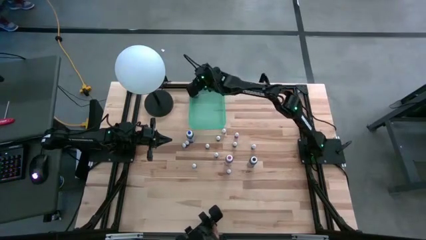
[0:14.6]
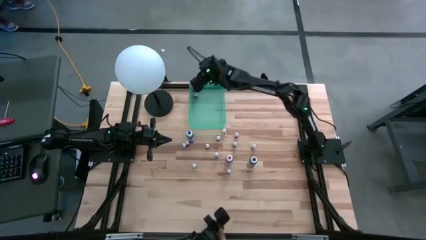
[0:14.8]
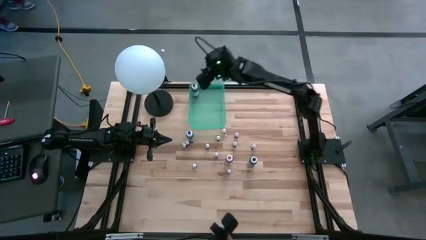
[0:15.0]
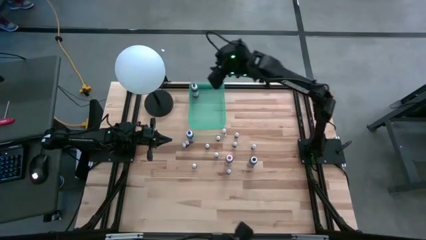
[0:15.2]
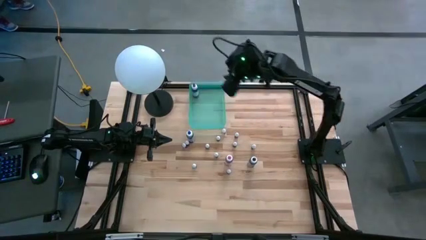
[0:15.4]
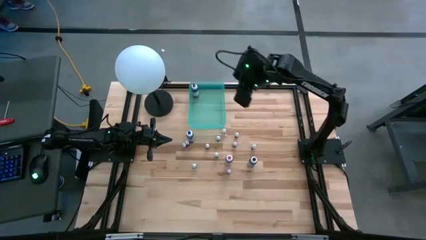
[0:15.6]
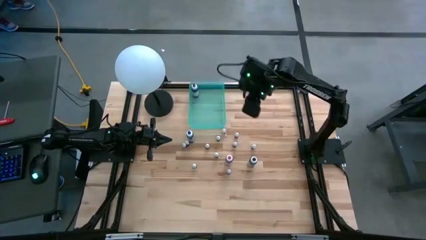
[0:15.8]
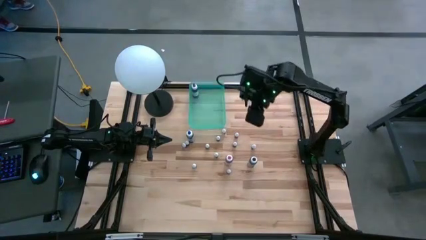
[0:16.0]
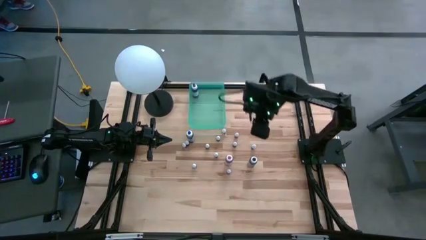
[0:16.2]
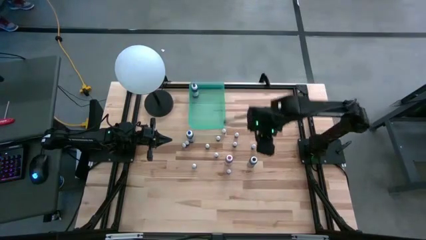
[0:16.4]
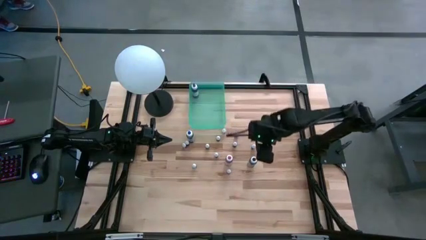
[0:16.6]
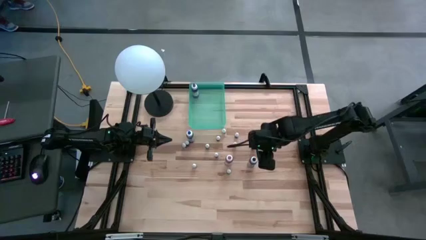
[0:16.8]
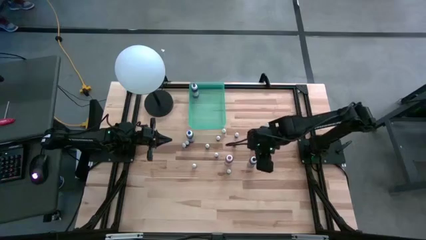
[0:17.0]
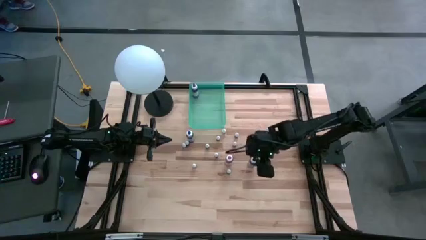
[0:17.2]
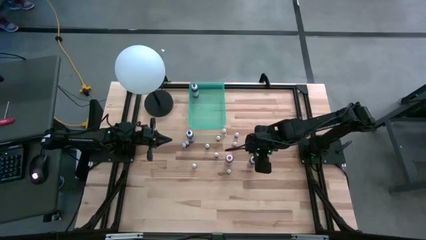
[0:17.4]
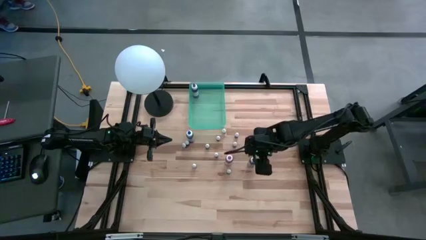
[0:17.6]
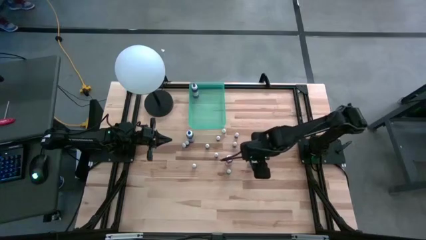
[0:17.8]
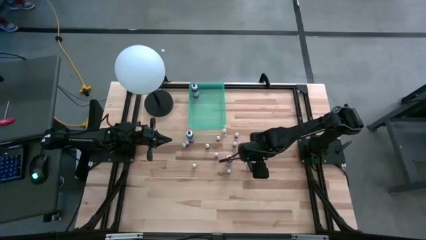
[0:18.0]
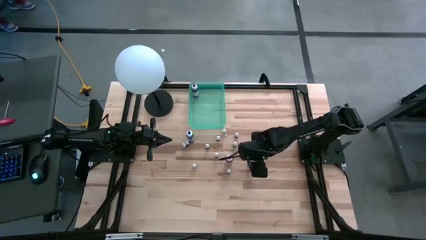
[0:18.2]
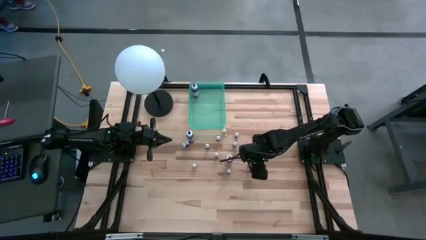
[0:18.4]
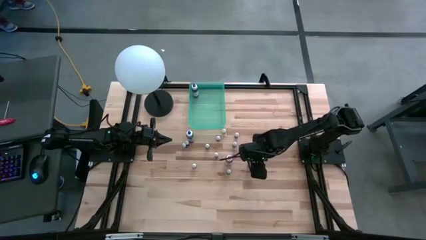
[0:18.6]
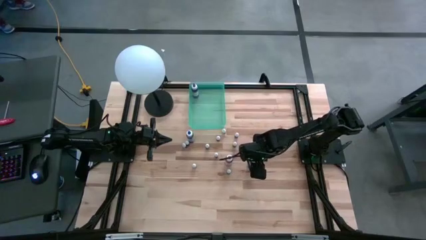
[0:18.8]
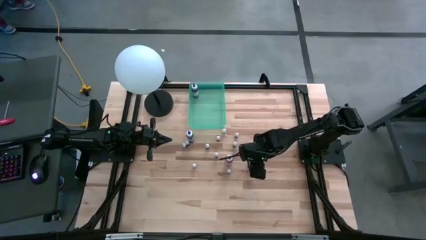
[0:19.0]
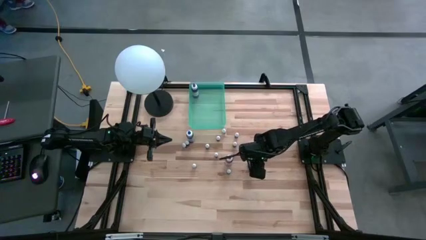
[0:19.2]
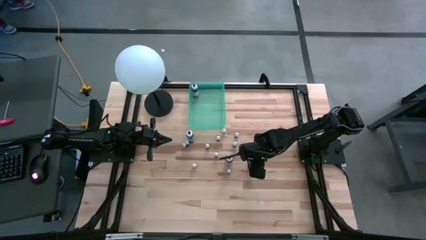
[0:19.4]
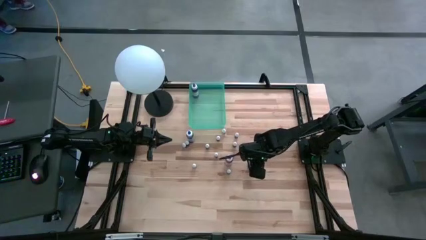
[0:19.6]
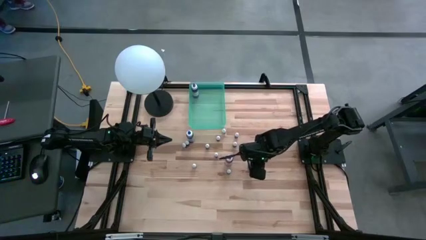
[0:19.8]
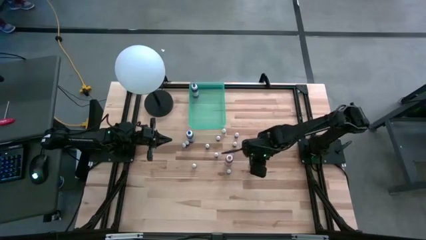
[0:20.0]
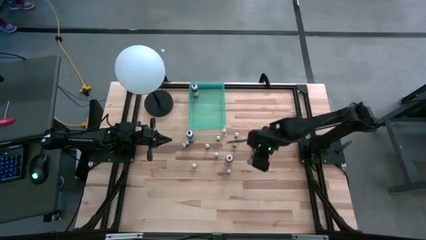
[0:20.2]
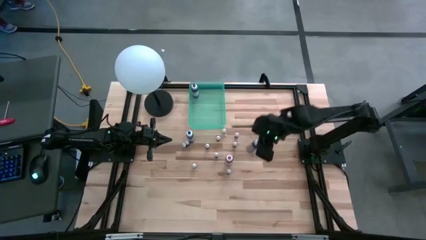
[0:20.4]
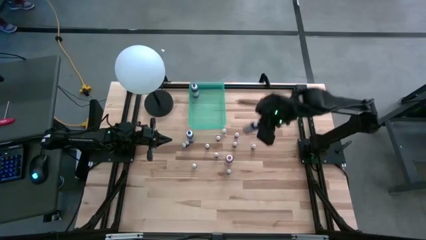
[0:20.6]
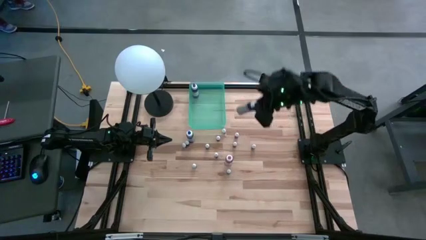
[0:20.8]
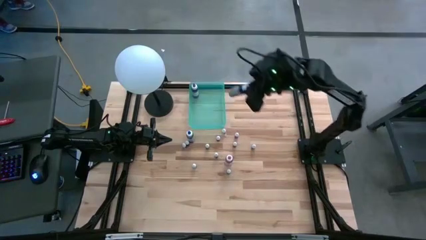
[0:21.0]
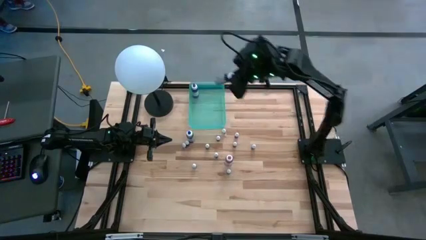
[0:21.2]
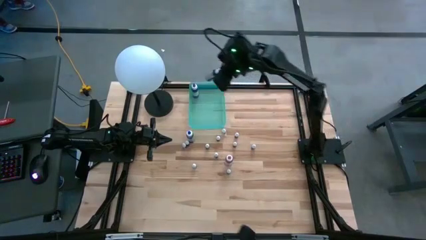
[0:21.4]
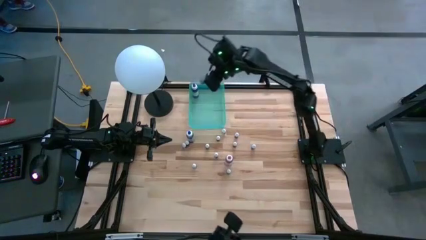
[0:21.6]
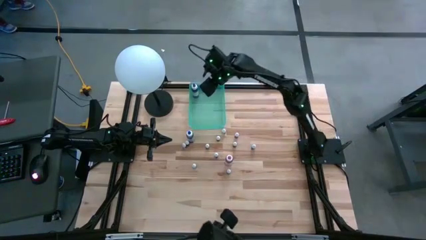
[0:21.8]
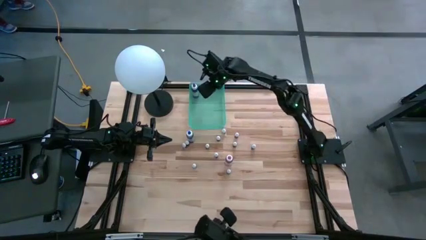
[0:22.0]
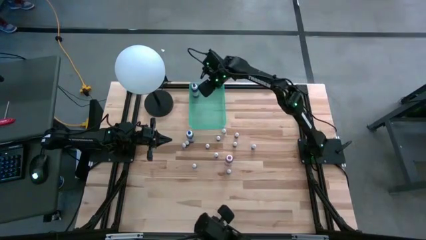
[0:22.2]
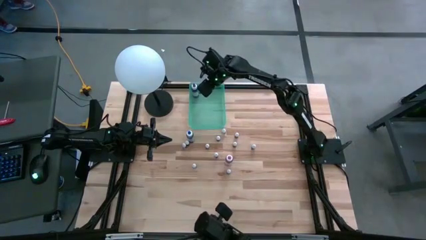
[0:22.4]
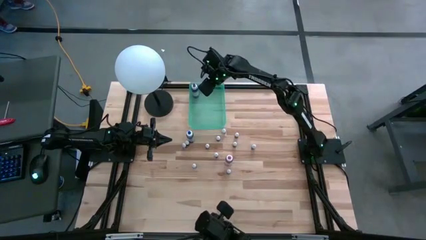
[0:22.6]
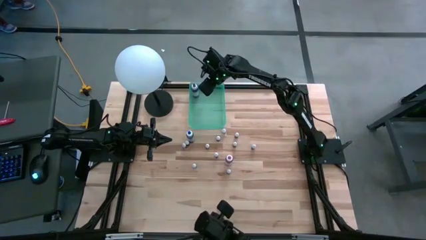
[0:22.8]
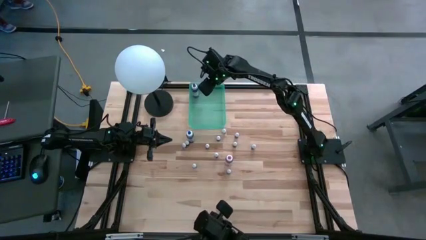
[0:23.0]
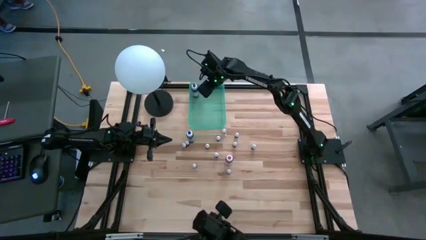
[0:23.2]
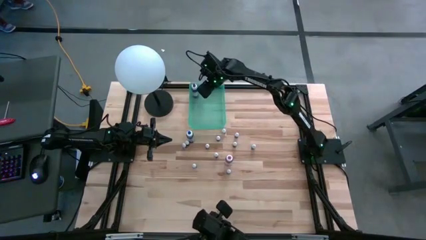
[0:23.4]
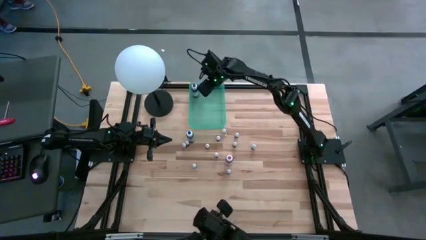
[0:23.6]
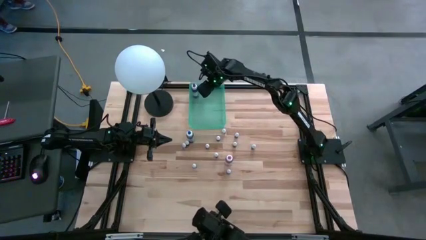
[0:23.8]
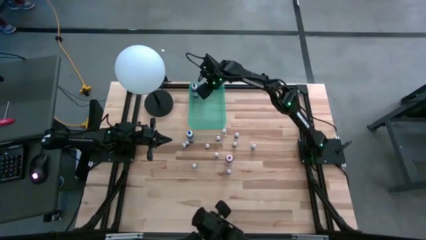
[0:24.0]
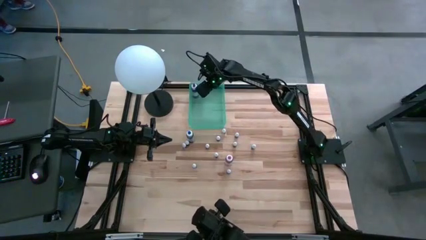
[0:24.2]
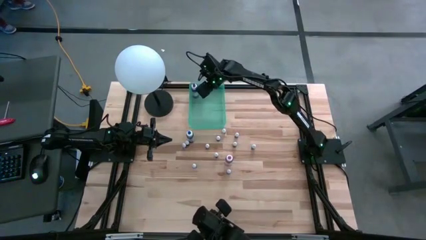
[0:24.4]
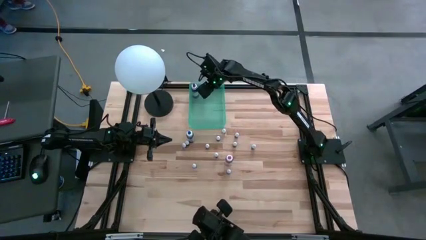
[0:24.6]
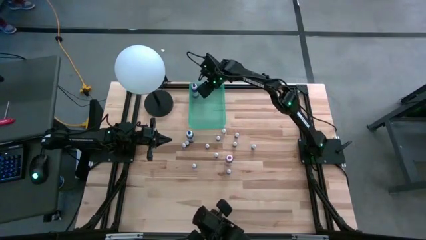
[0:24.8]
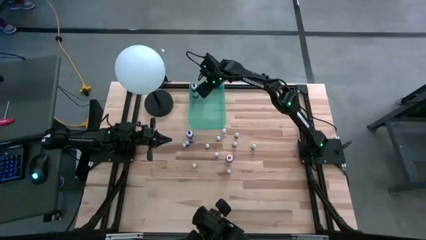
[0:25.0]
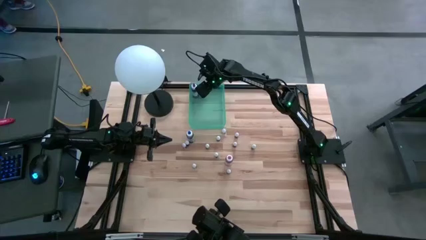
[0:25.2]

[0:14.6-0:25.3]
Task: Pick & Place food coloring
Put the large black food coloring bottle into the blue bin

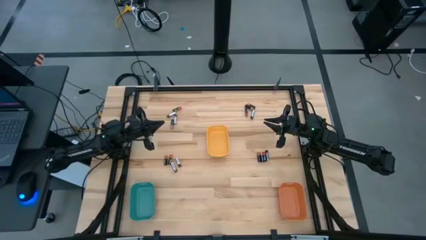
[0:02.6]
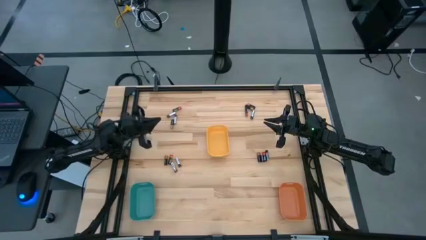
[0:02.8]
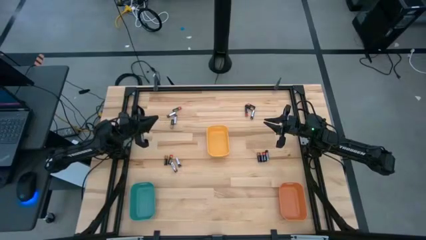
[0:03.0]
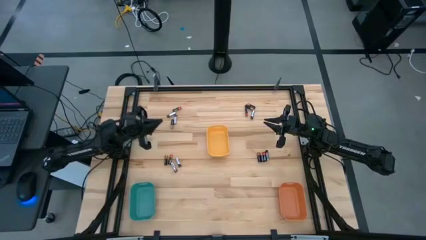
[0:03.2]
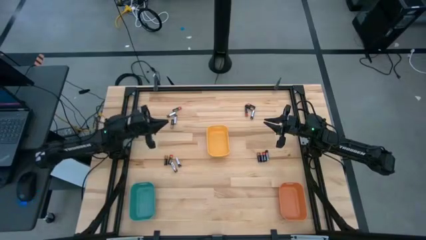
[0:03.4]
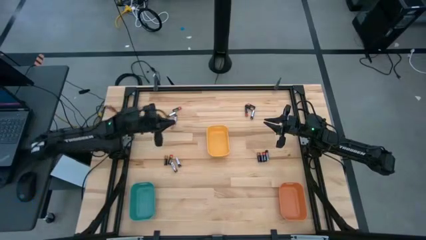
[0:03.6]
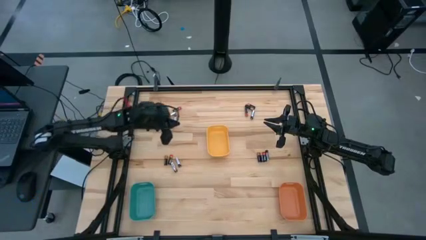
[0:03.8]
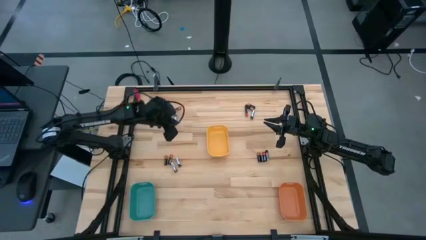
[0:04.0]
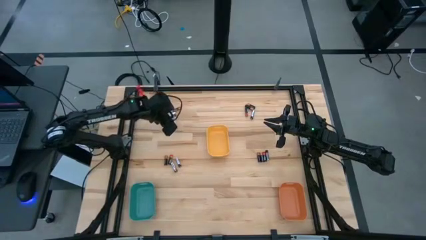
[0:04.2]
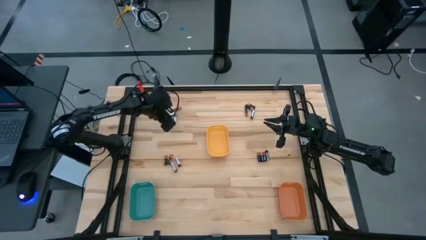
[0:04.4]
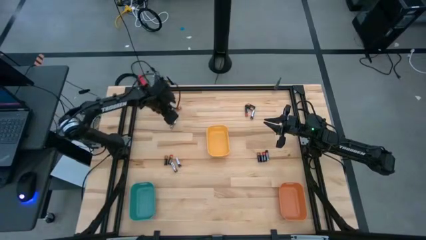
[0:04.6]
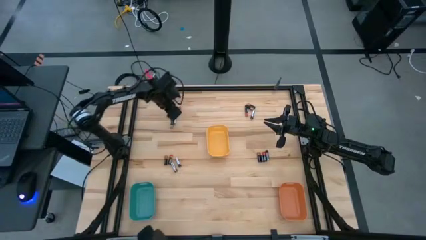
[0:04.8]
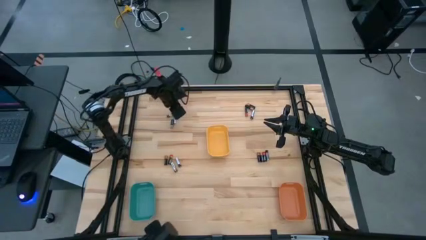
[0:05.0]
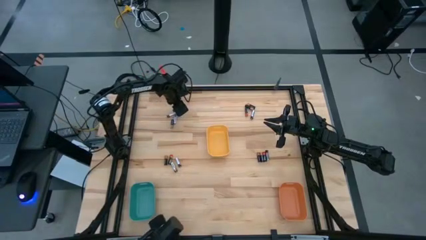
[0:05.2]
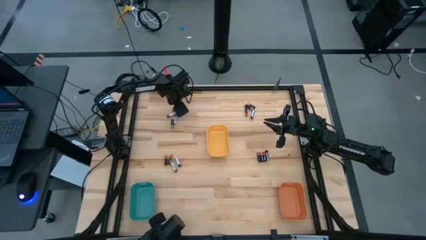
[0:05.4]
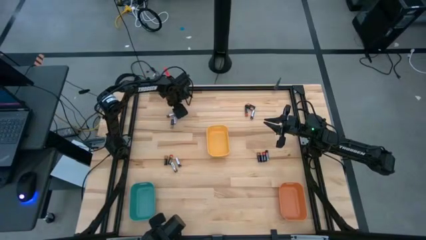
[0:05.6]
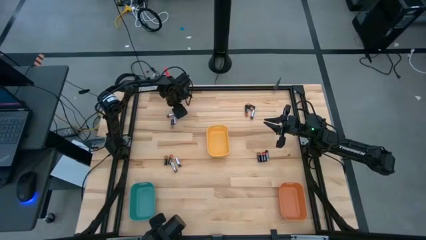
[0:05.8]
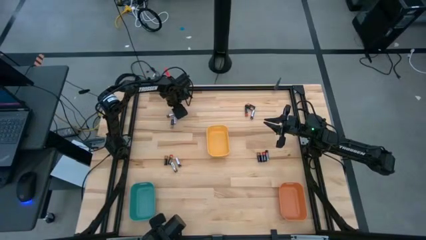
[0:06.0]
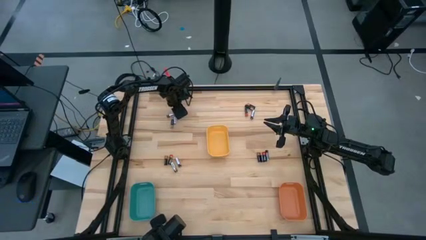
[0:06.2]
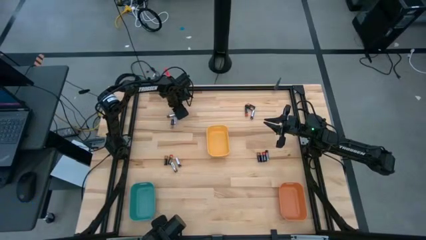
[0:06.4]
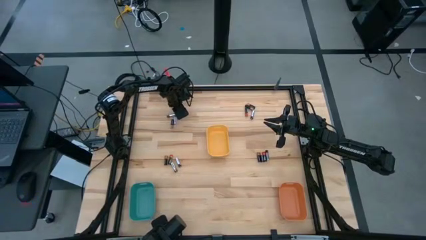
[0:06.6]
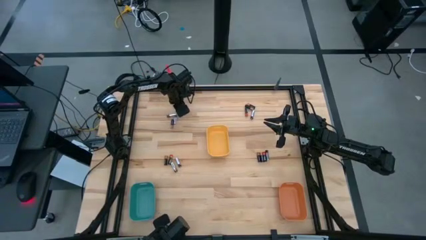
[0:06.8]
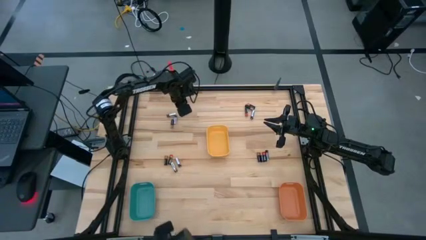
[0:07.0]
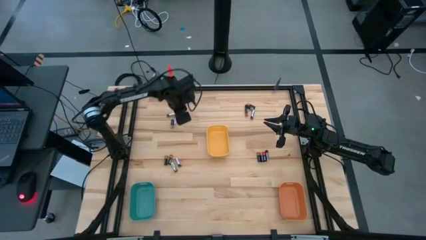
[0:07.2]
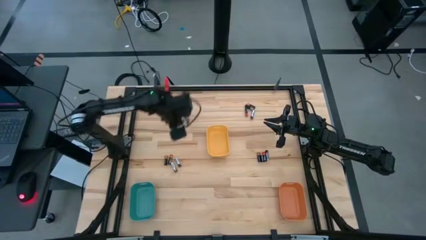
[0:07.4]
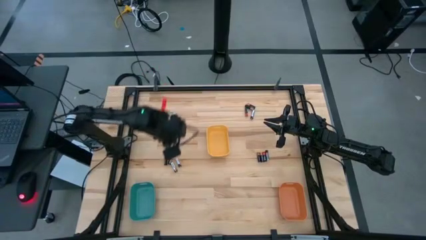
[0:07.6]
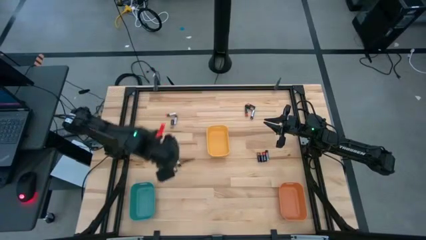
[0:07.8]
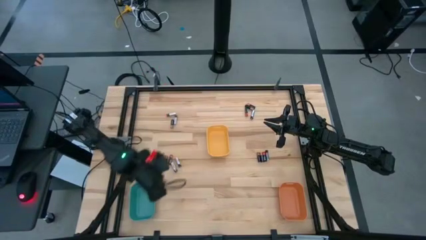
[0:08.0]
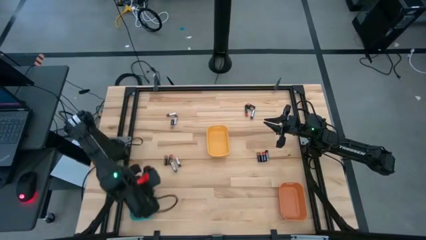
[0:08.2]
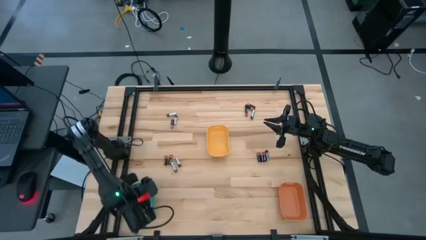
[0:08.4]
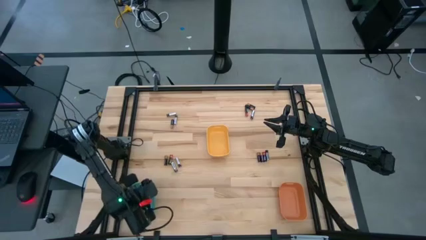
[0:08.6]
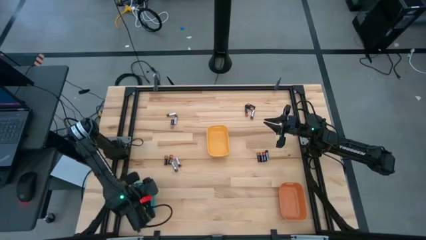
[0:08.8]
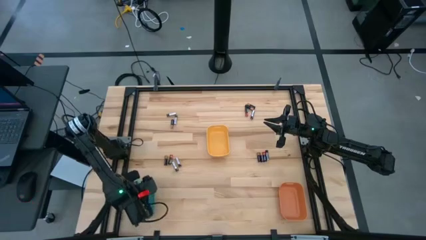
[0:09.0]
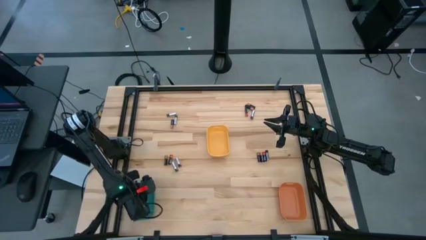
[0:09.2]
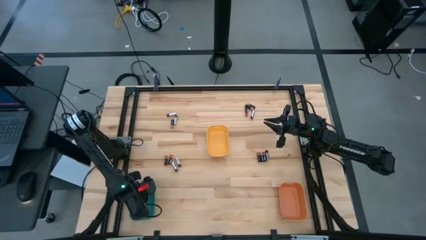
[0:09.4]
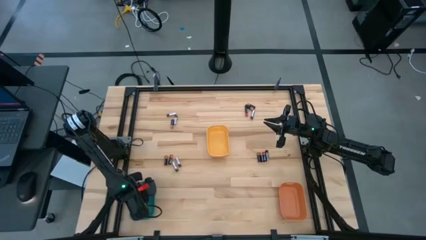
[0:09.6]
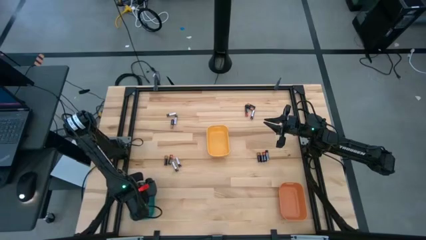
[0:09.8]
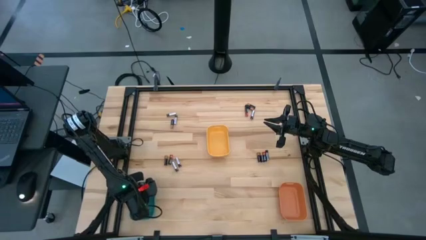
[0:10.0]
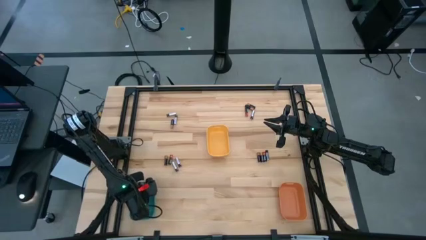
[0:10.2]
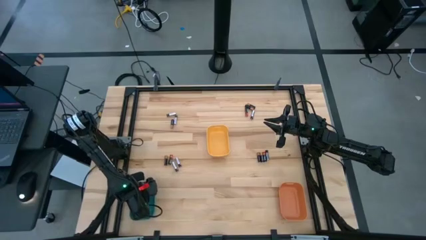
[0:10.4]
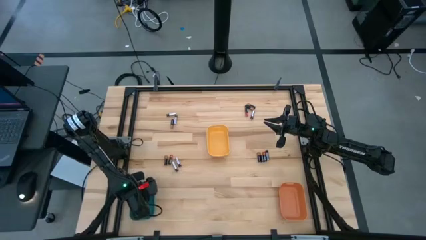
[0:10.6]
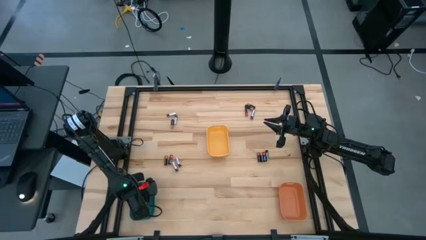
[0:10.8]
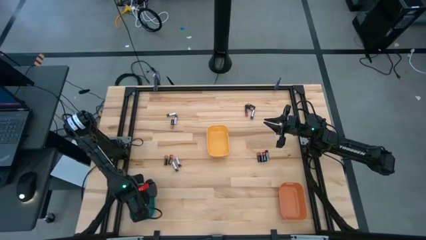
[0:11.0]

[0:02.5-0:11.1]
Task: Sort batteries
Put the red battery into the blue bin
